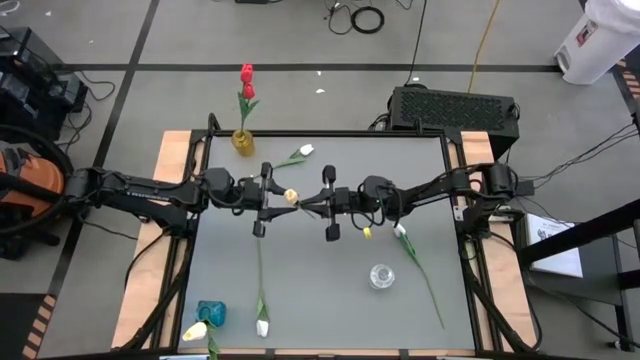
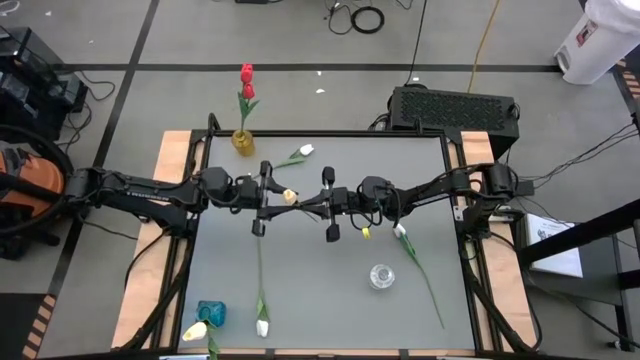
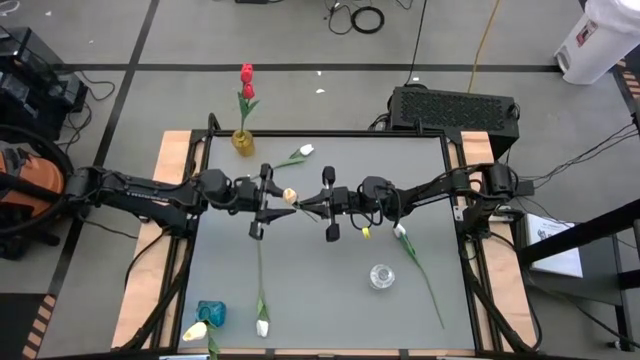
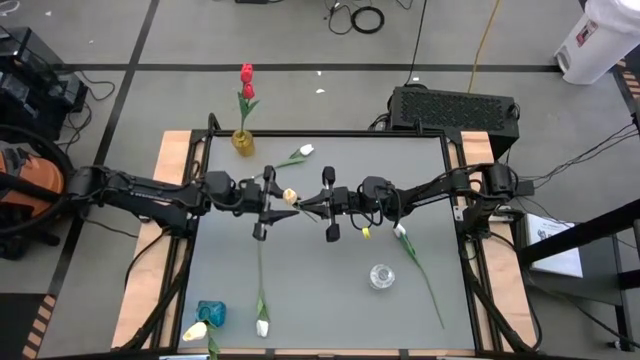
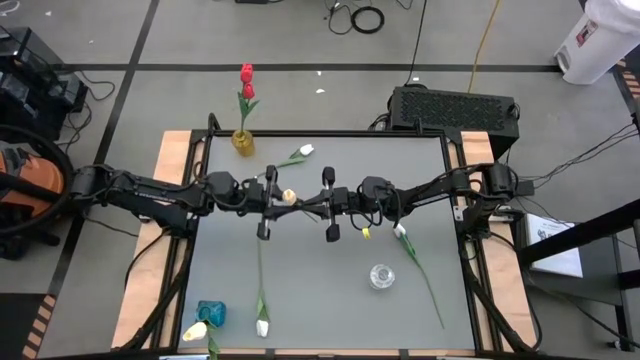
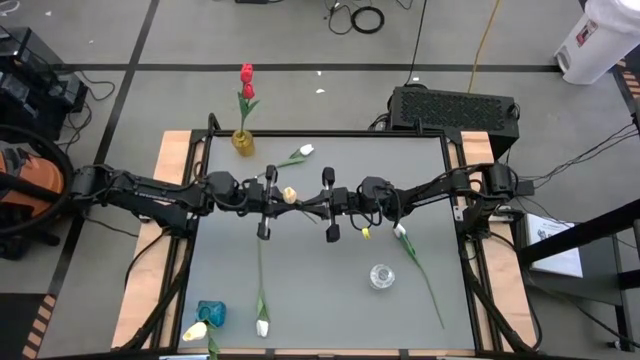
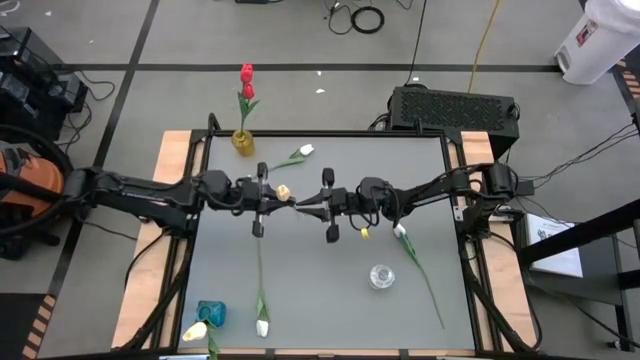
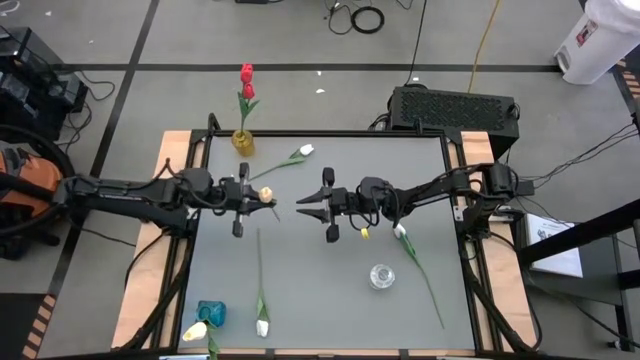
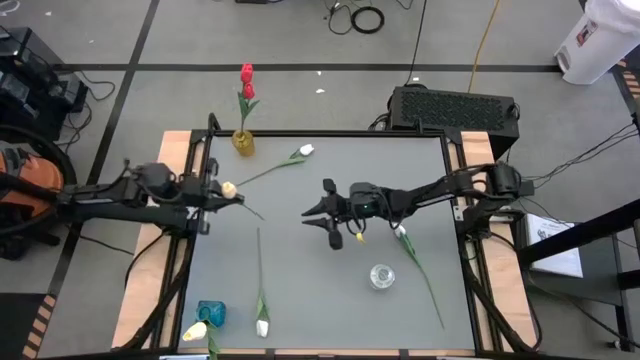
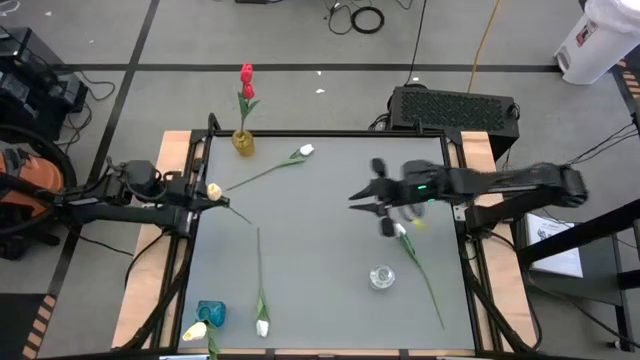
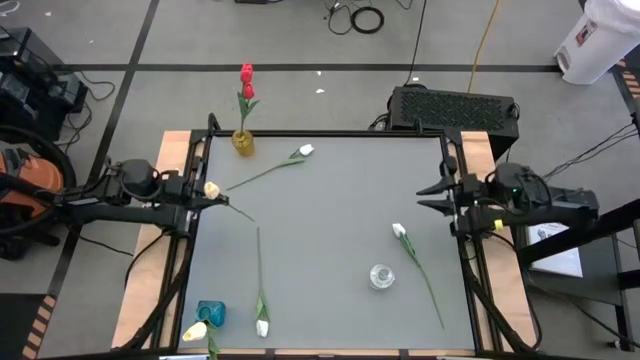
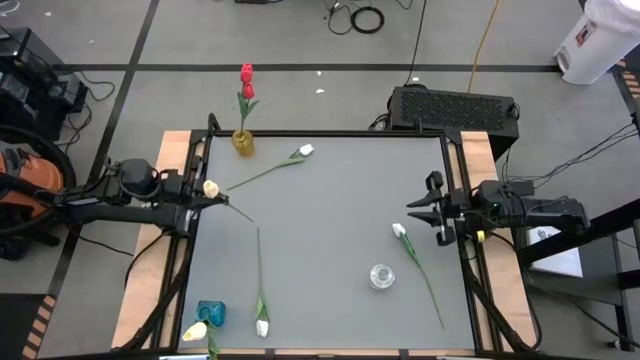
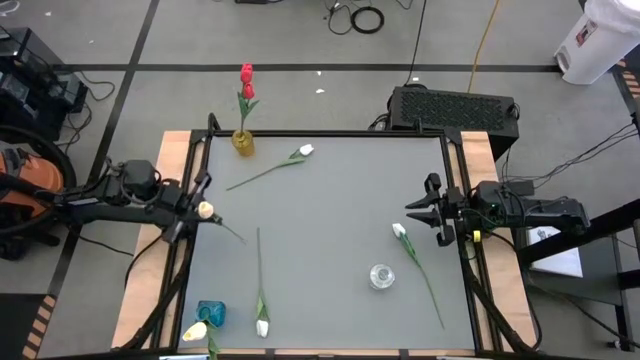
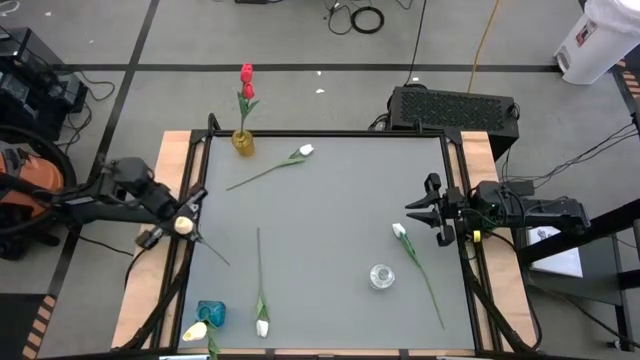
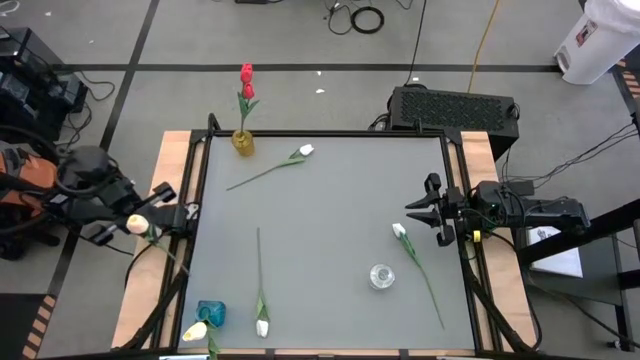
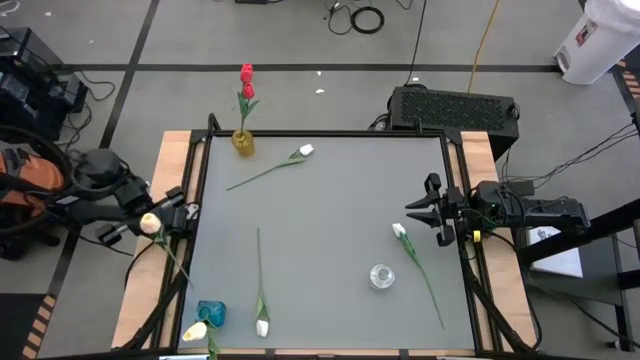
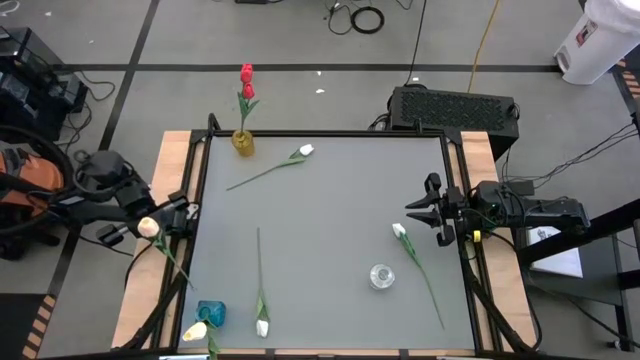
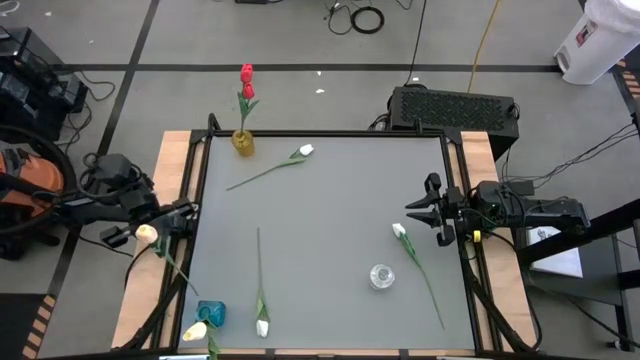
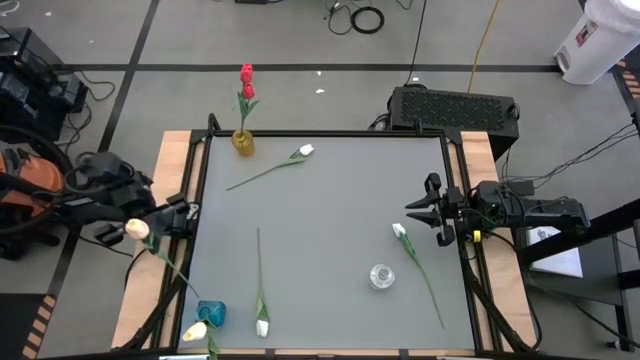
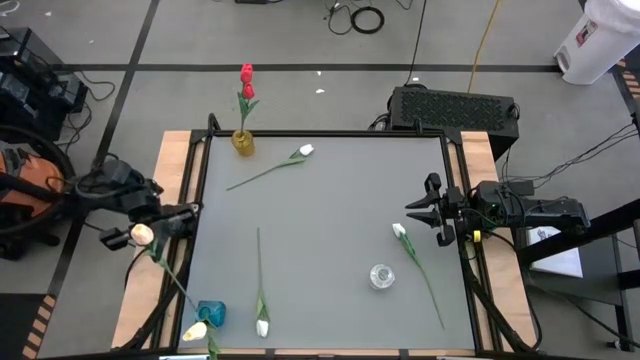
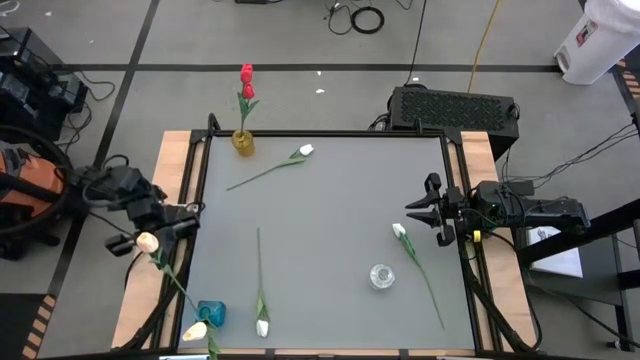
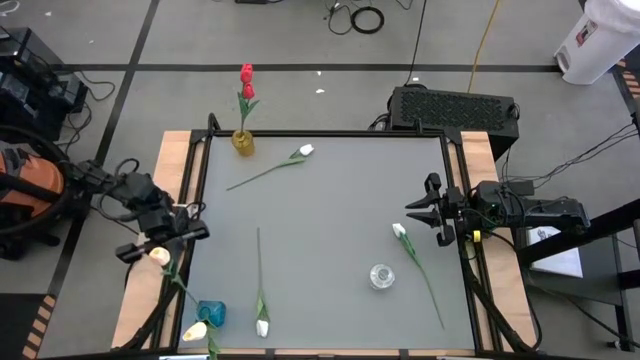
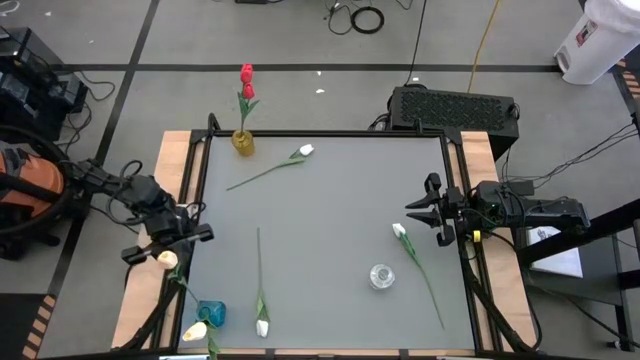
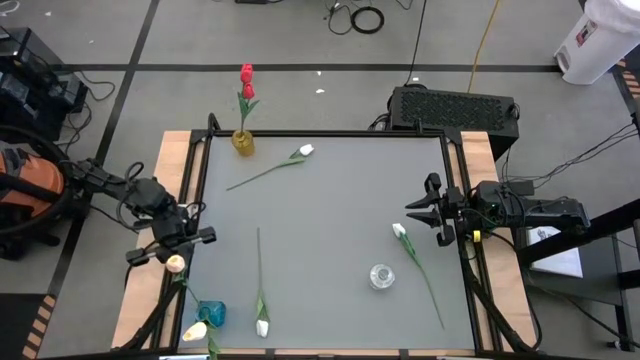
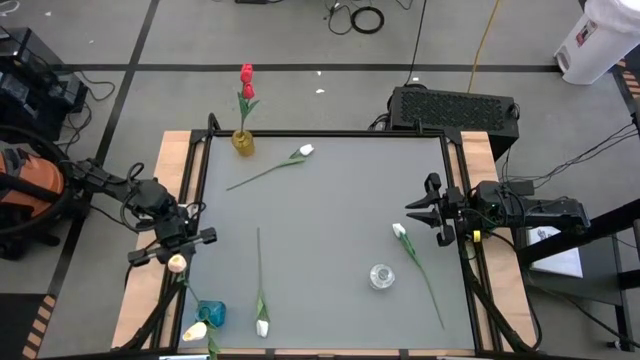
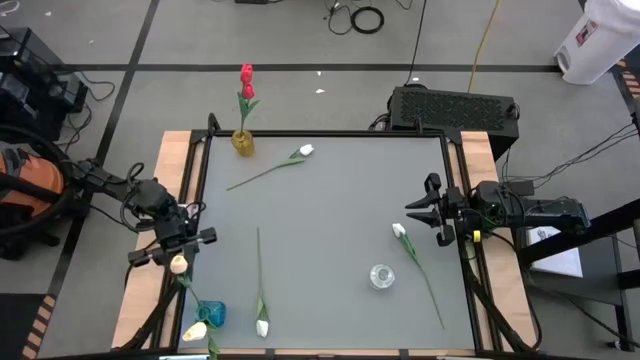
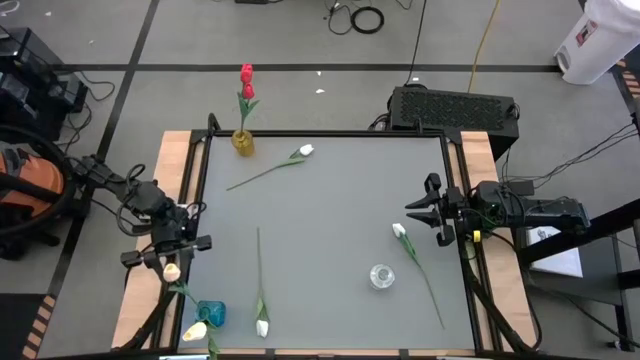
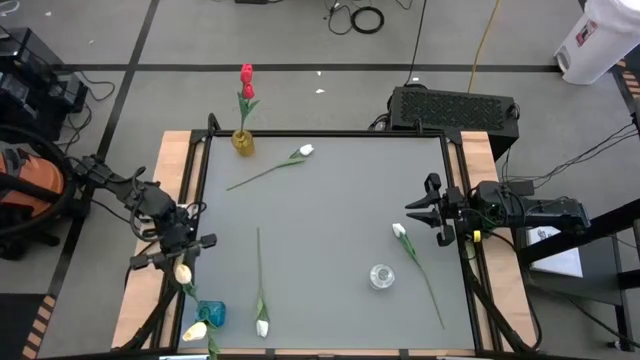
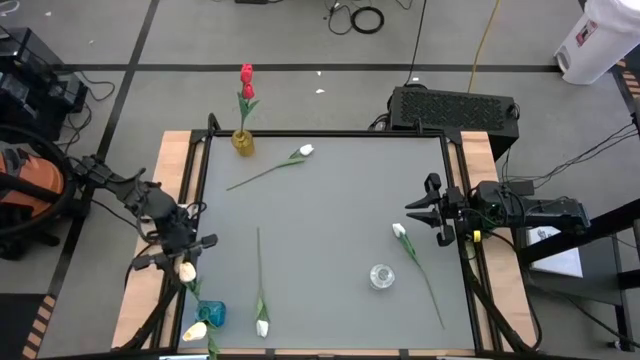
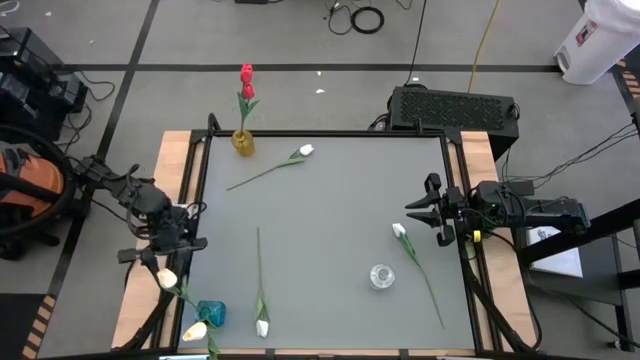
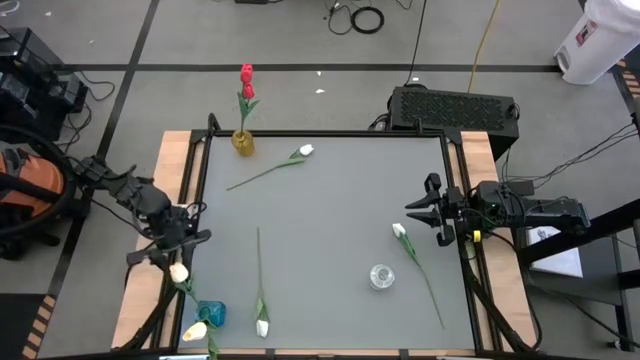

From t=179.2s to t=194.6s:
Task: Sort flowers into vase by color
Put the yellow tulip into the blue vase
